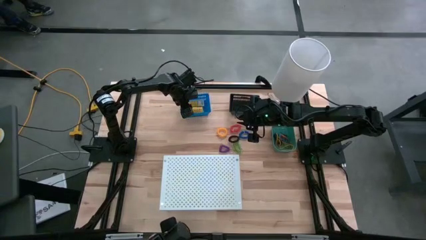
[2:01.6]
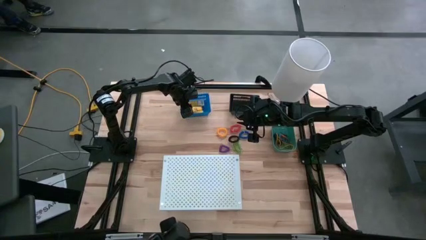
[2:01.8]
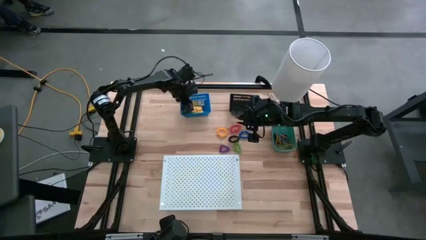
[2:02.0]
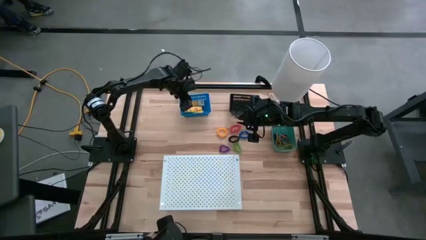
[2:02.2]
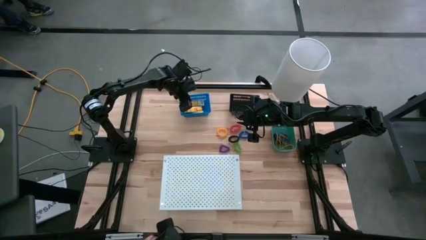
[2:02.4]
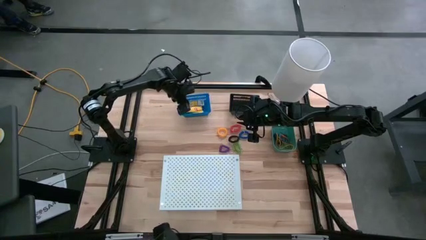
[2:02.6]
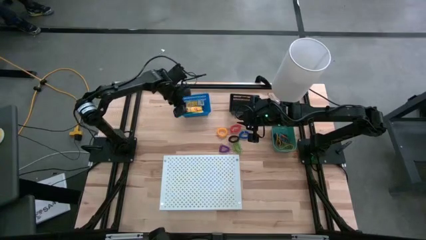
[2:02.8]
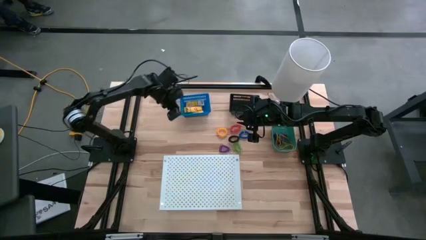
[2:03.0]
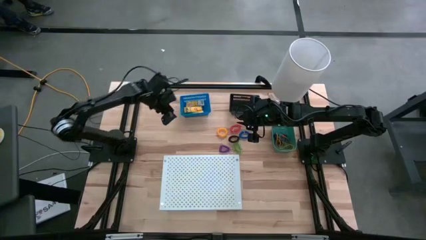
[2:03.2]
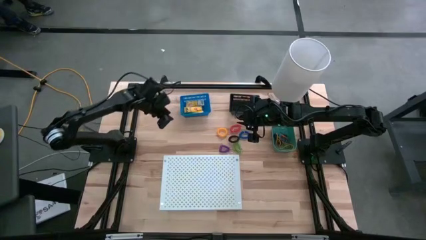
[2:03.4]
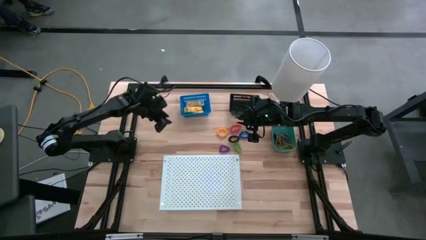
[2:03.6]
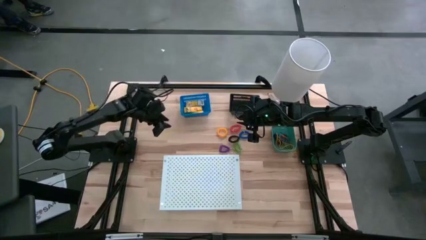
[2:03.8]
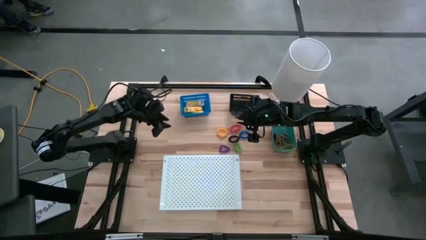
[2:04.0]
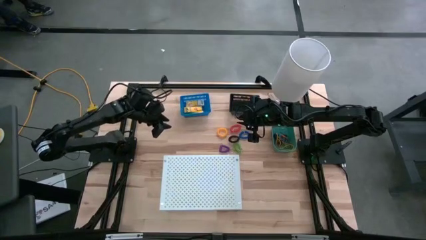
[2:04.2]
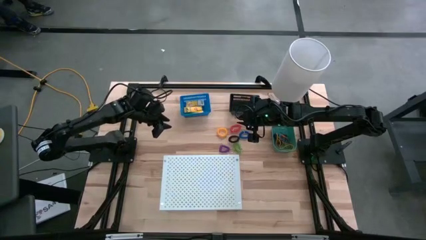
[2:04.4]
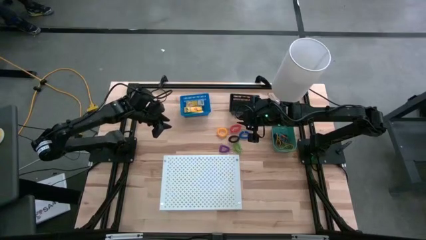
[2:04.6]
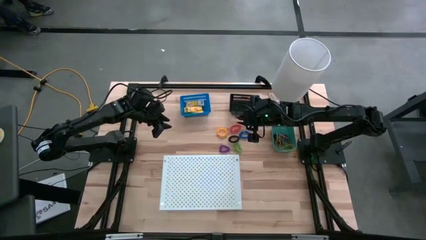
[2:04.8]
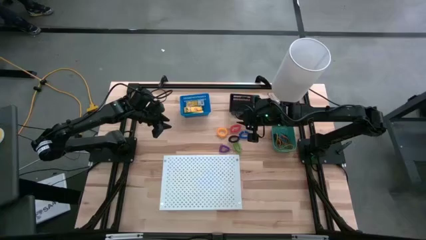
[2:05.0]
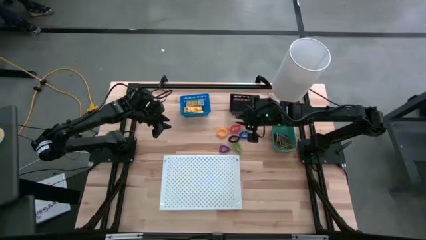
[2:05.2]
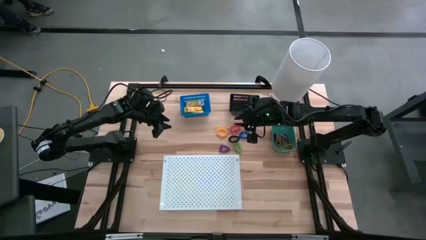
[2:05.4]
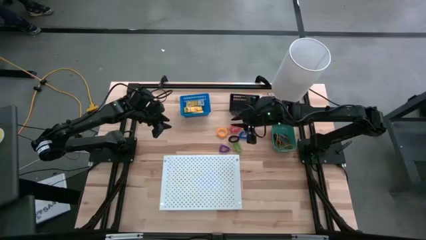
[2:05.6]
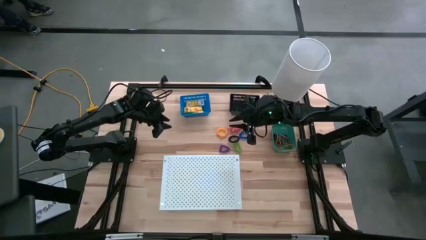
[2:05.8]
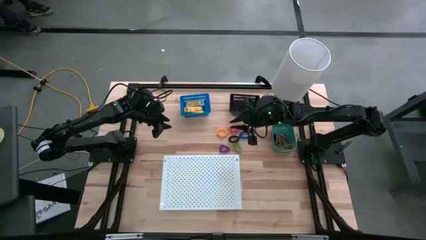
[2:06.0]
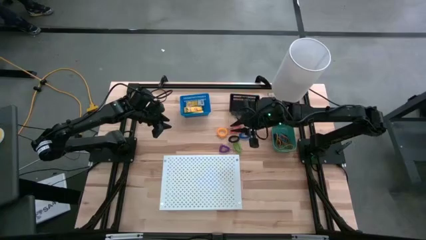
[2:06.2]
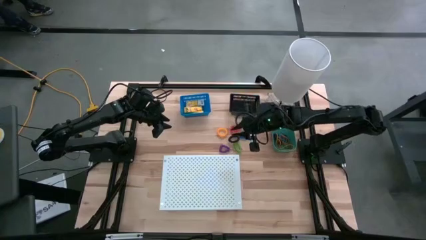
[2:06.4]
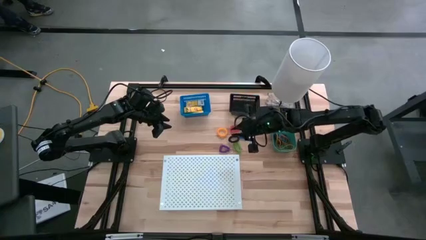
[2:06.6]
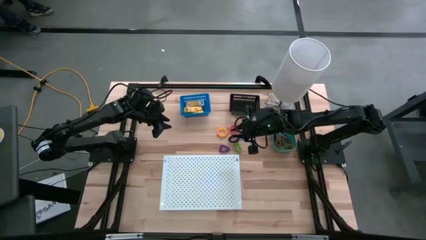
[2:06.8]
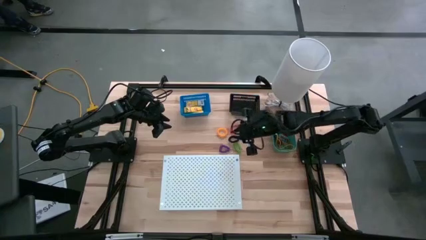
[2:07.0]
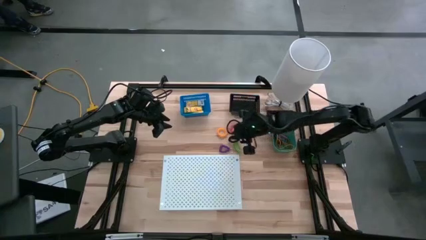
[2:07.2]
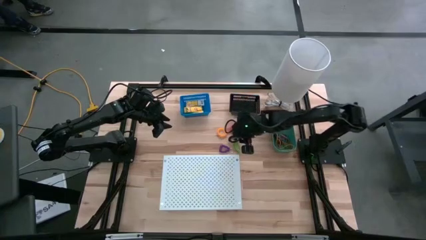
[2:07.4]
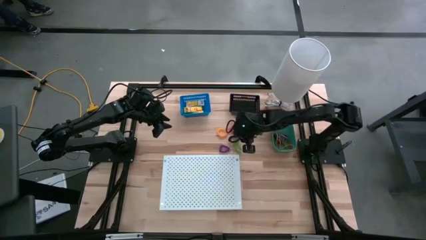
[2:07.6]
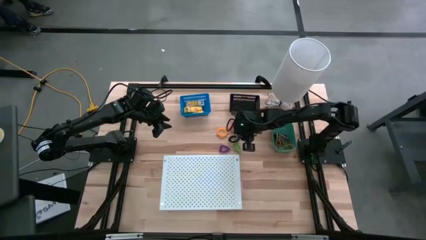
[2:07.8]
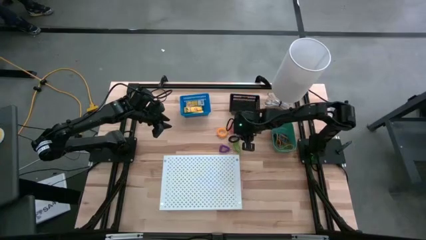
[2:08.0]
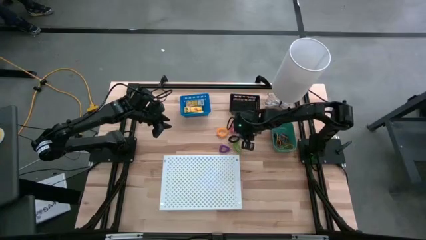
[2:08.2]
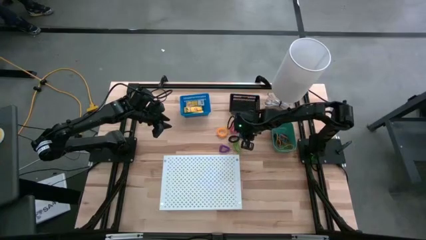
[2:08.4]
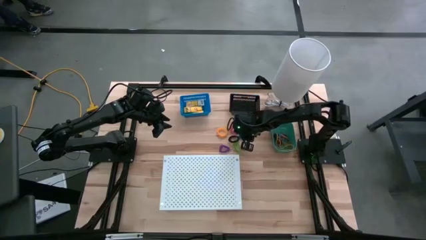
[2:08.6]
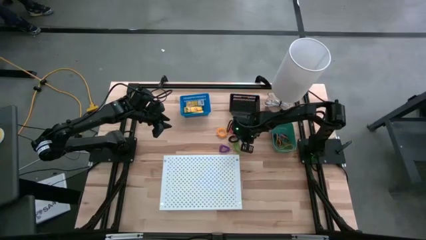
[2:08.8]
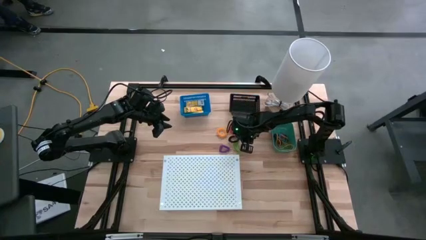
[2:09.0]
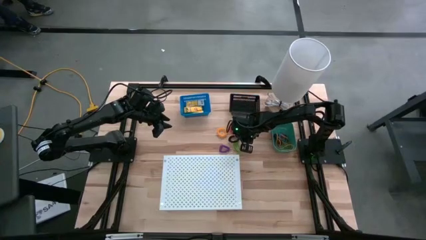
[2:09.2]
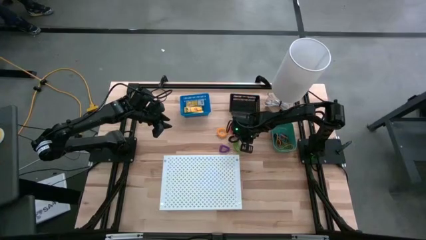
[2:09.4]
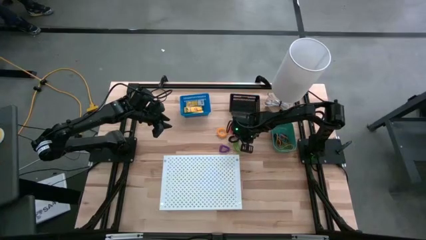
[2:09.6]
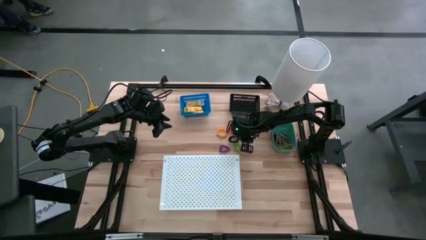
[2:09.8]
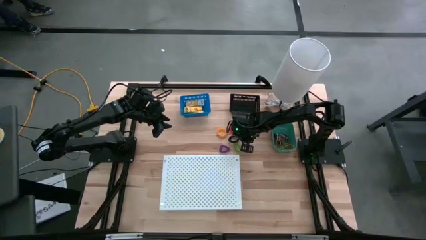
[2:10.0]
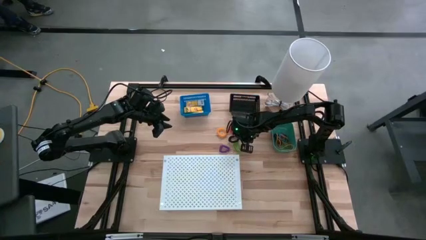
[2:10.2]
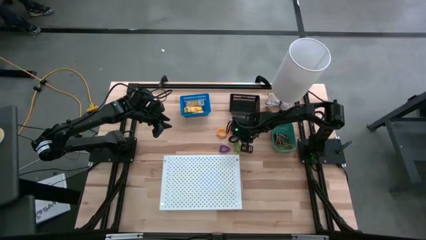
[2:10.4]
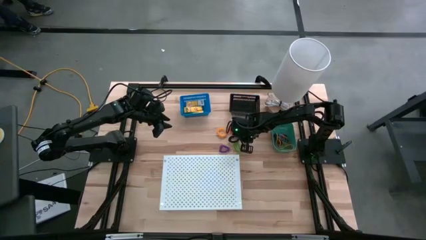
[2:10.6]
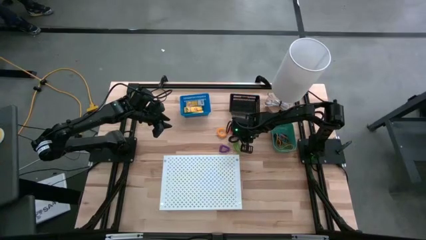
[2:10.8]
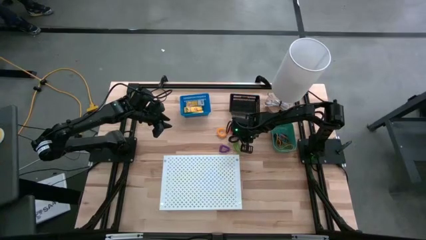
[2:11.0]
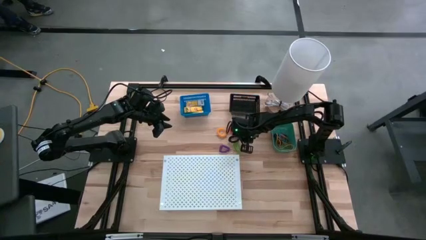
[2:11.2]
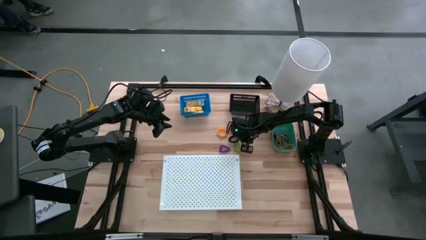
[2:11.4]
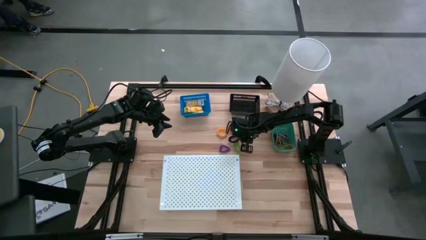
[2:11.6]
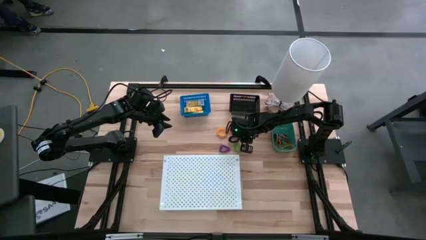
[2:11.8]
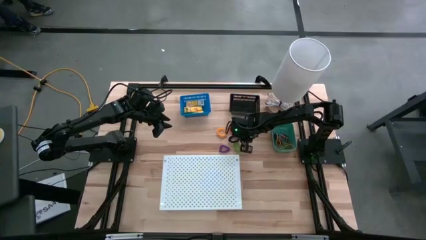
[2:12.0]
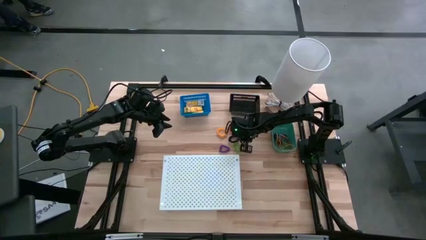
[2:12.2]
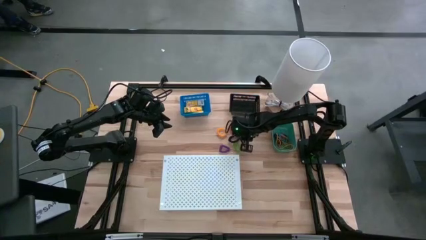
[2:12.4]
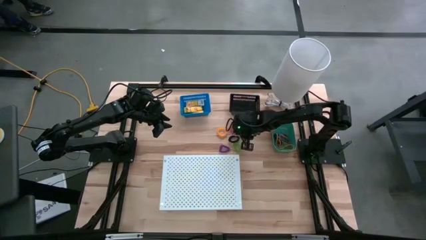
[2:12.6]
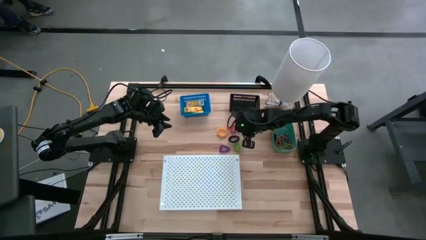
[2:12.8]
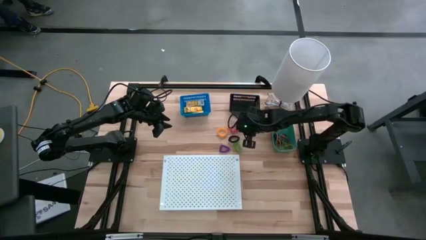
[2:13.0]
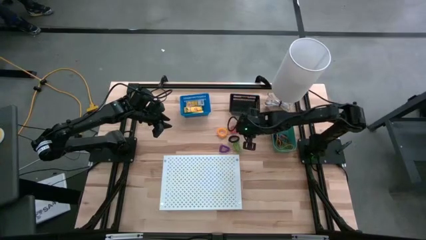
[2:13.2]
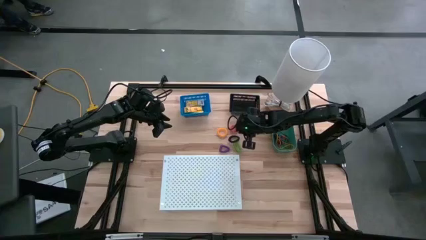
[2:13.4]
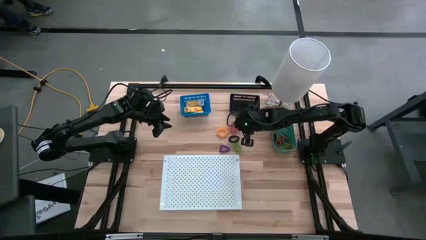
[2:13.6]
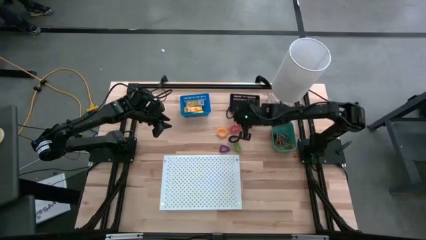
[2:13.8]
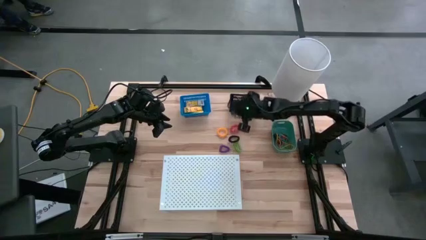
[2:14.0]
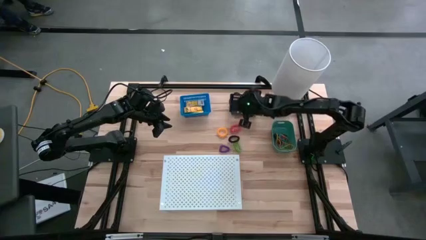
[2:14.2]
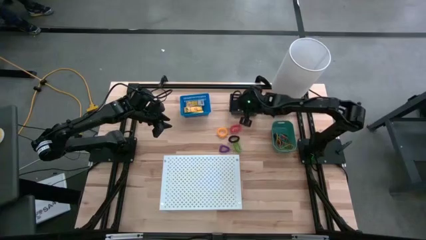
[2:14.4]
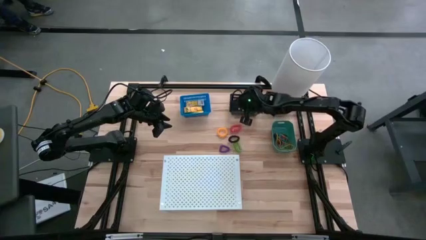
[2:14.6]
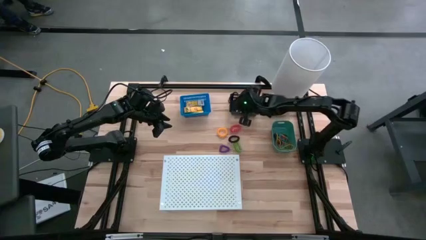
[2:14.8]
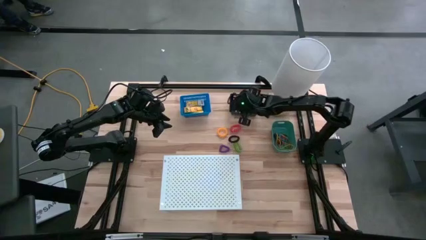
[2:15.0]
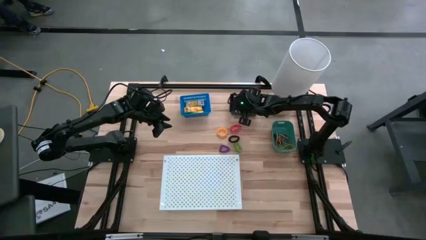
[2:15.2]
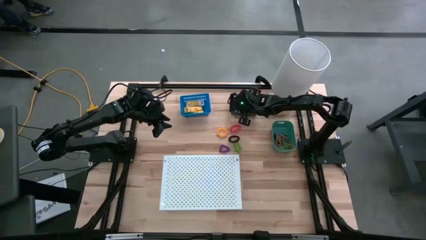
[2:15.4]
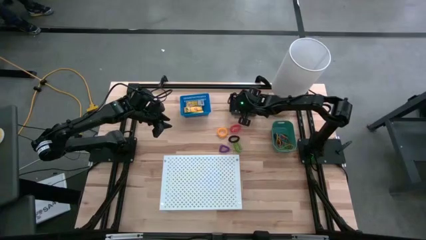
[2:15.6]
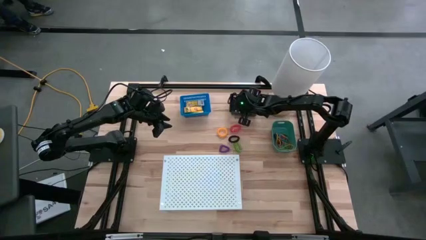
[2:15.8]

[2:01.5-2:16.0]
Task: Pick & Place Office Desk Supplies
Put the blue spring keychain into the black bin
